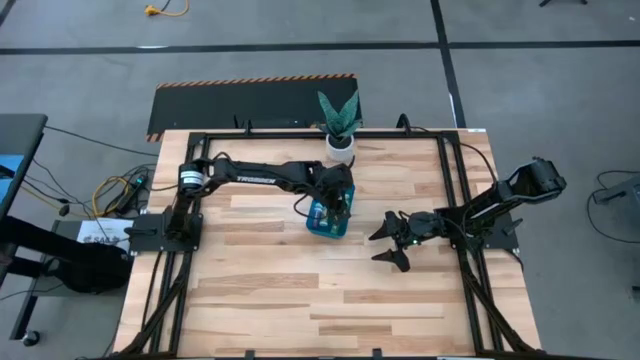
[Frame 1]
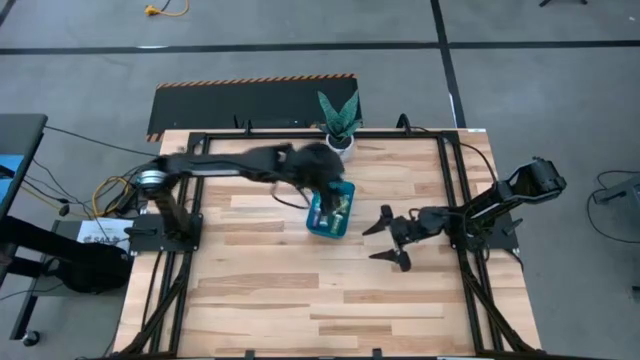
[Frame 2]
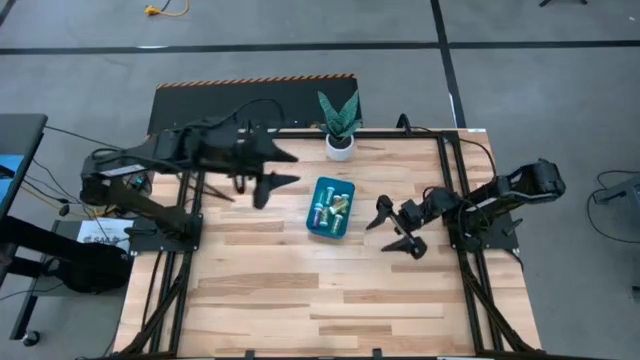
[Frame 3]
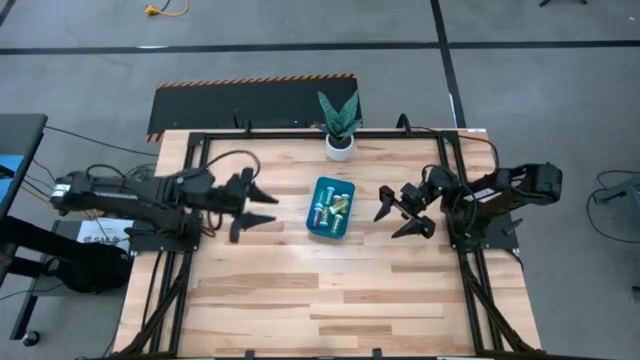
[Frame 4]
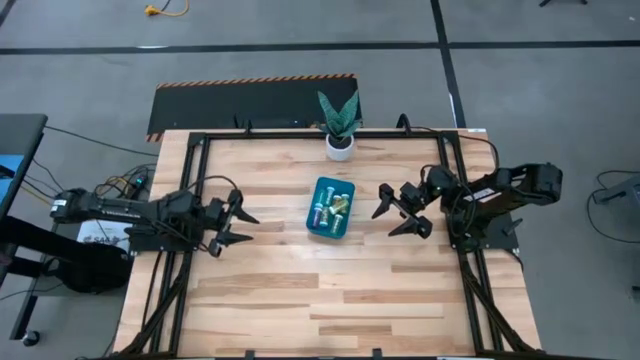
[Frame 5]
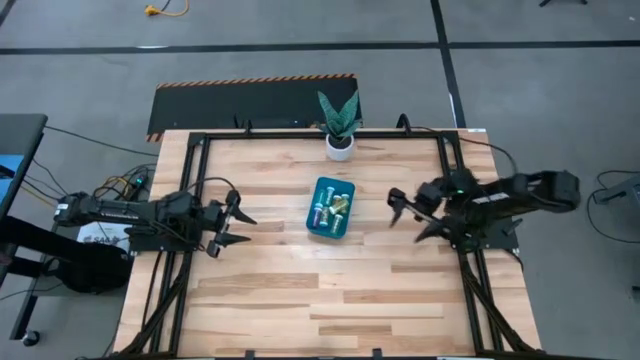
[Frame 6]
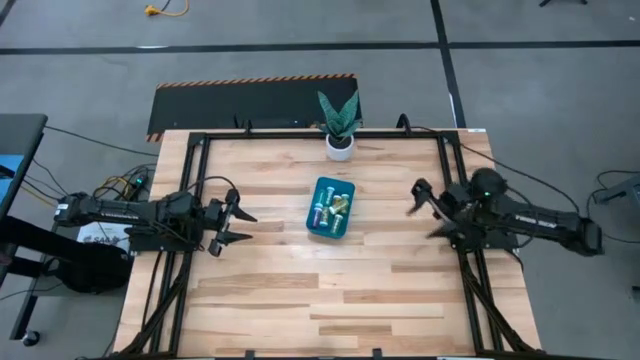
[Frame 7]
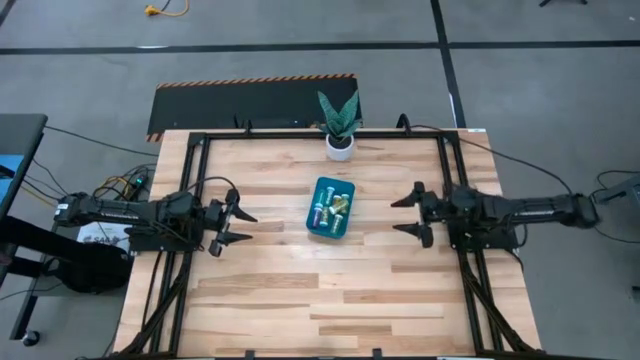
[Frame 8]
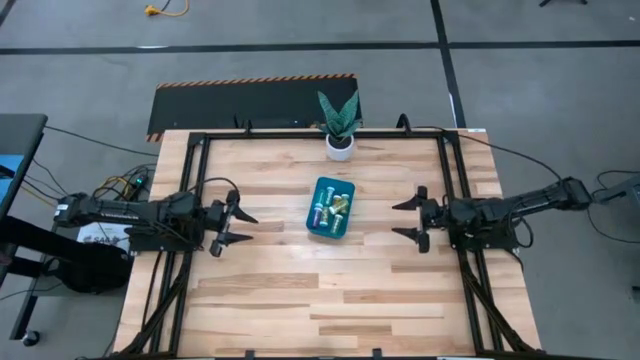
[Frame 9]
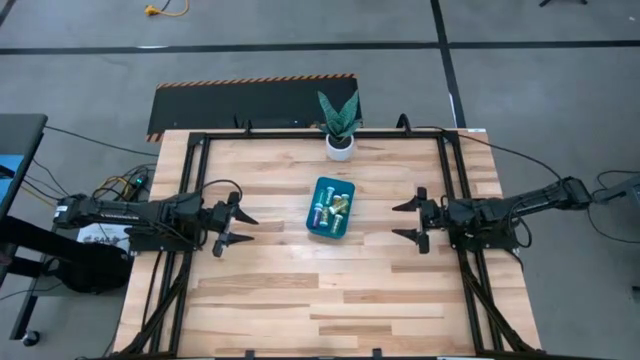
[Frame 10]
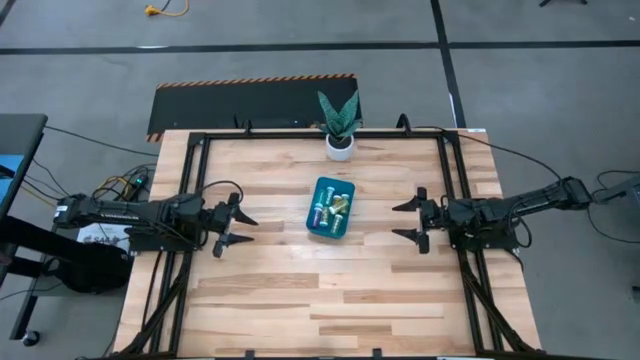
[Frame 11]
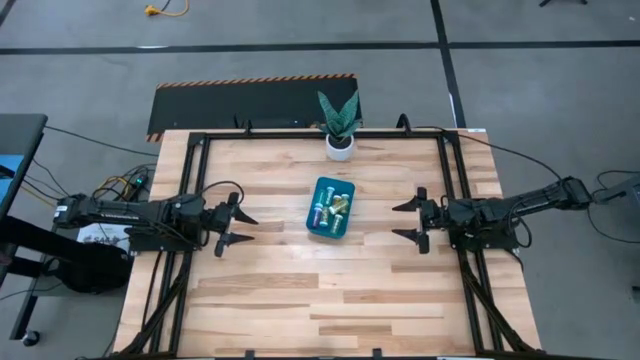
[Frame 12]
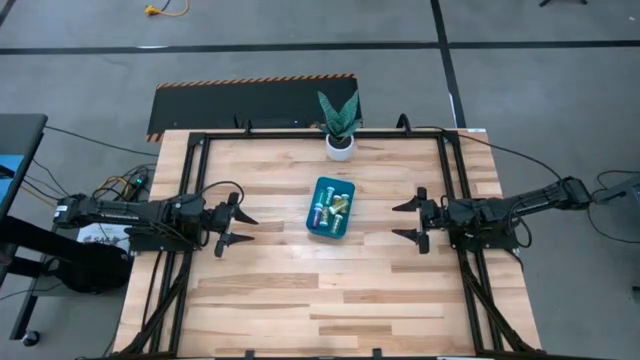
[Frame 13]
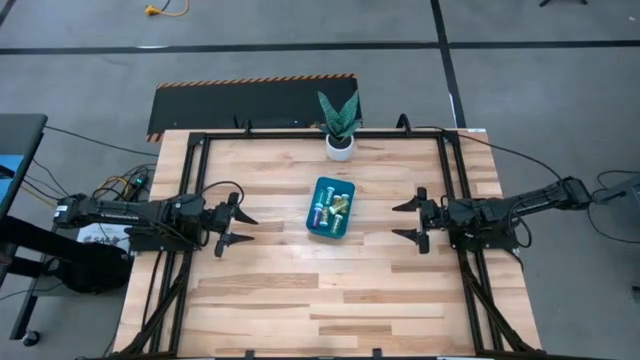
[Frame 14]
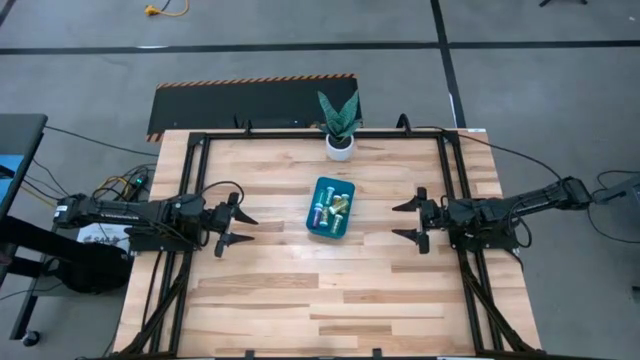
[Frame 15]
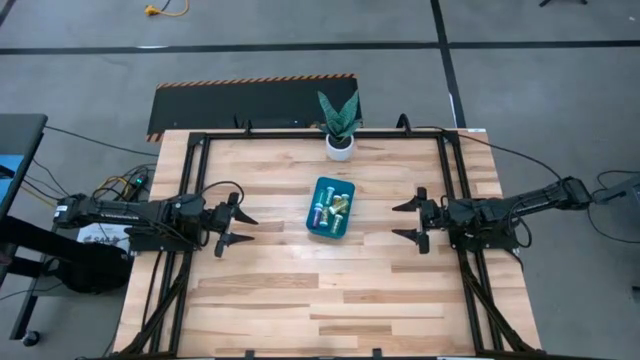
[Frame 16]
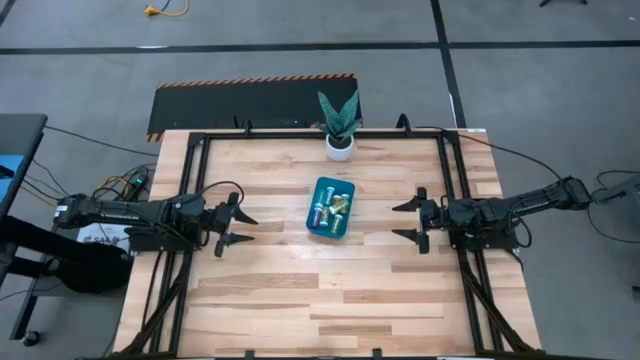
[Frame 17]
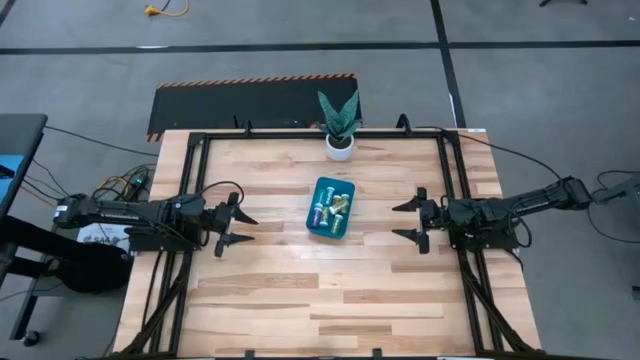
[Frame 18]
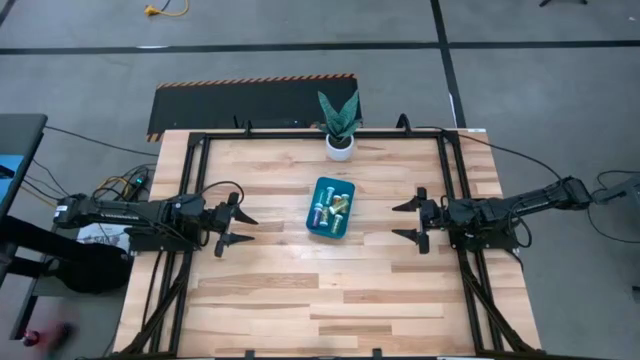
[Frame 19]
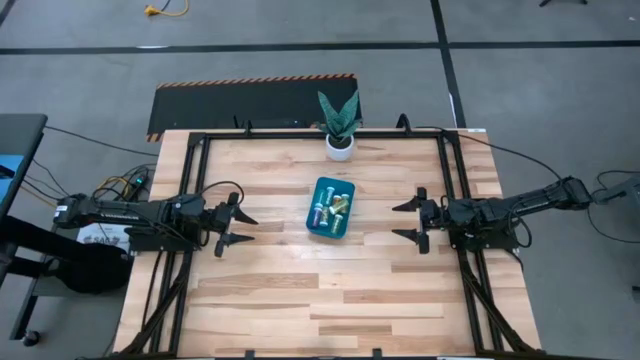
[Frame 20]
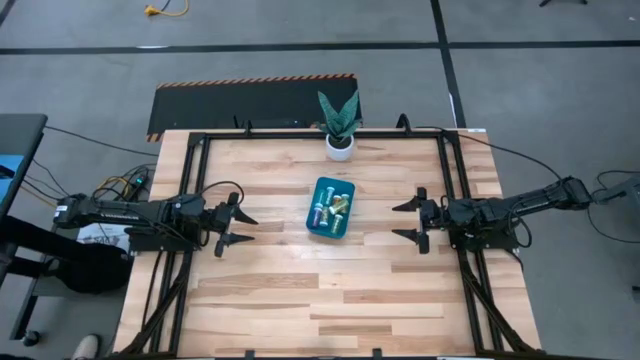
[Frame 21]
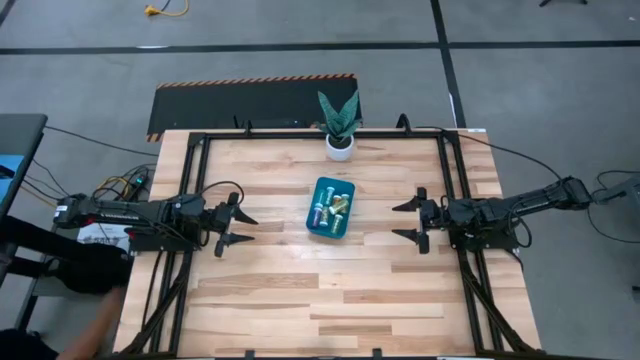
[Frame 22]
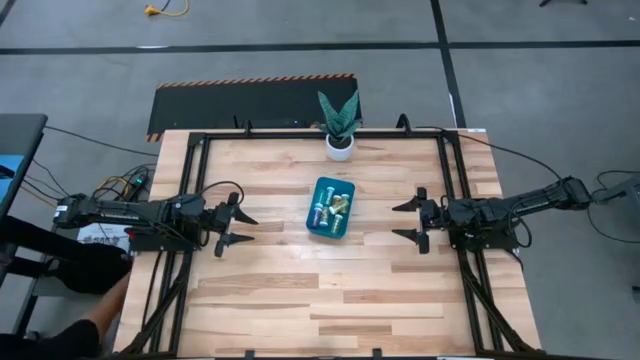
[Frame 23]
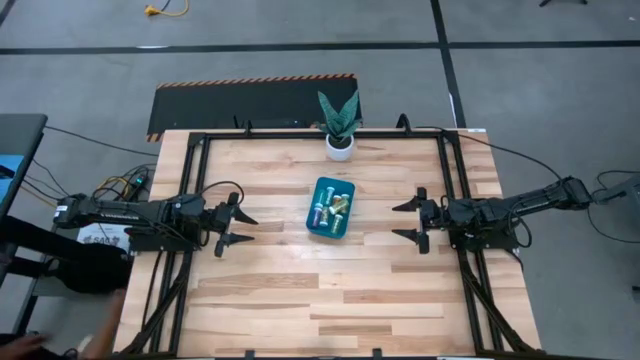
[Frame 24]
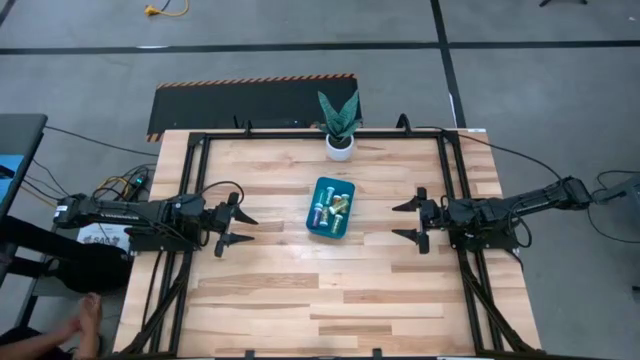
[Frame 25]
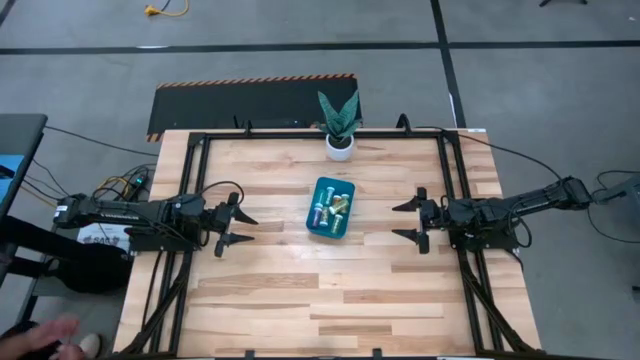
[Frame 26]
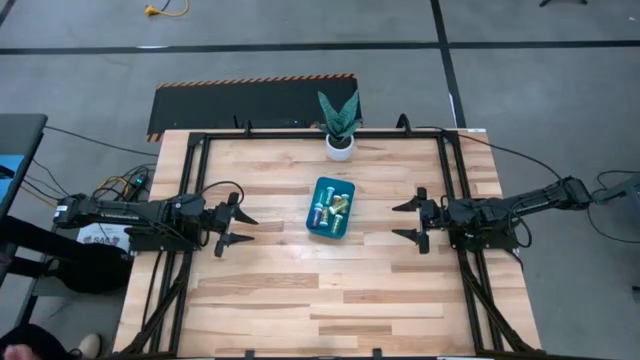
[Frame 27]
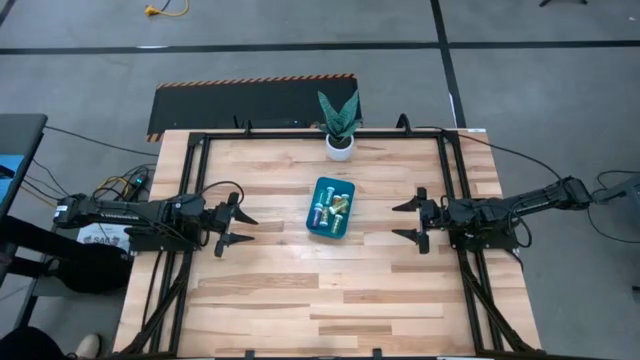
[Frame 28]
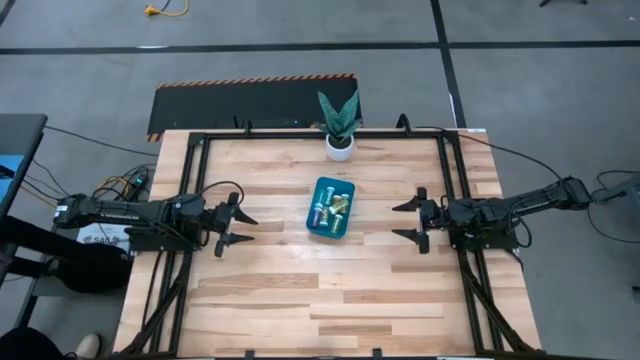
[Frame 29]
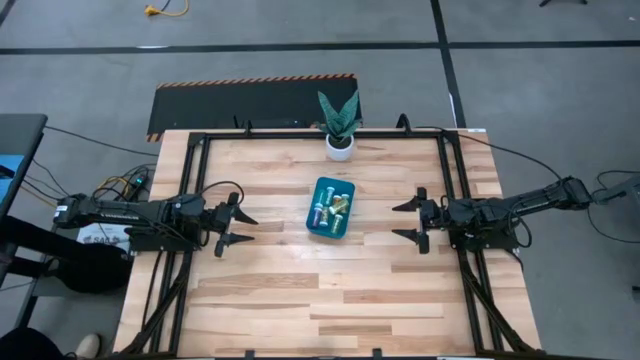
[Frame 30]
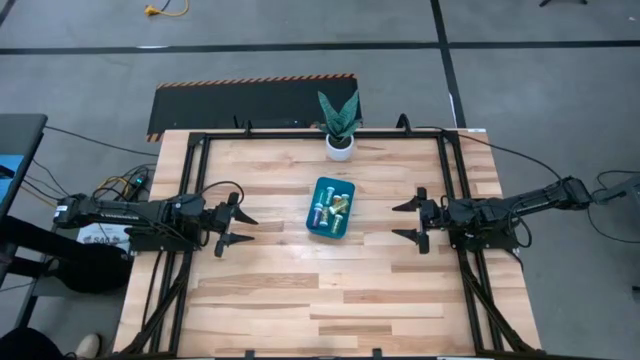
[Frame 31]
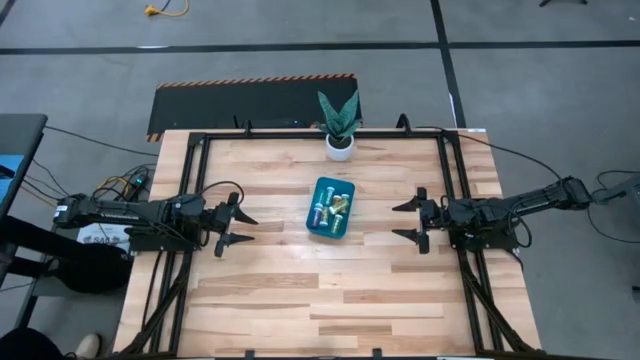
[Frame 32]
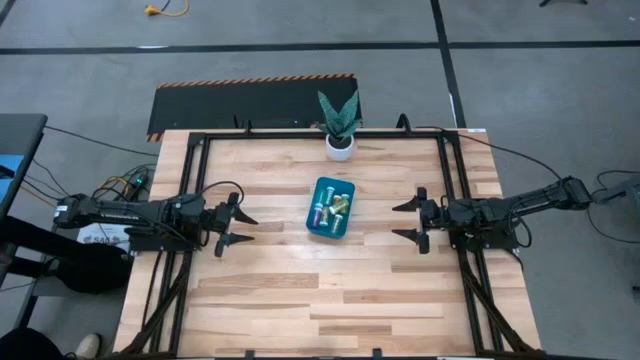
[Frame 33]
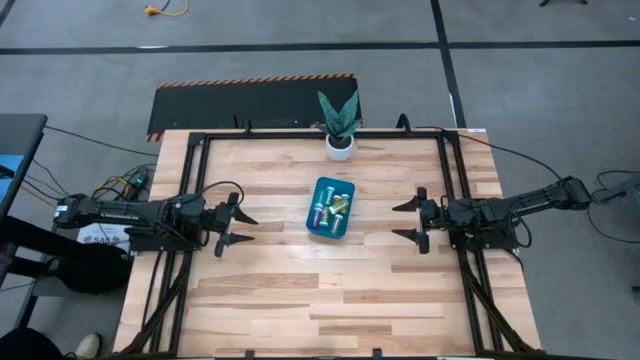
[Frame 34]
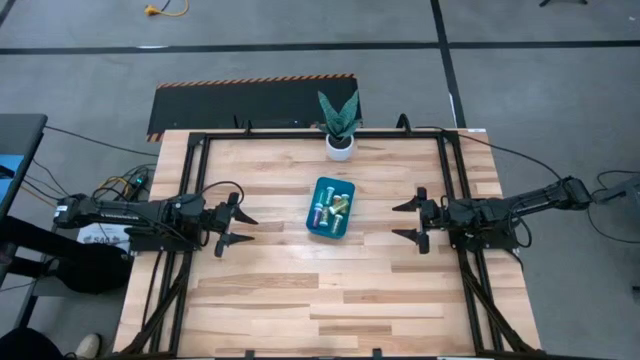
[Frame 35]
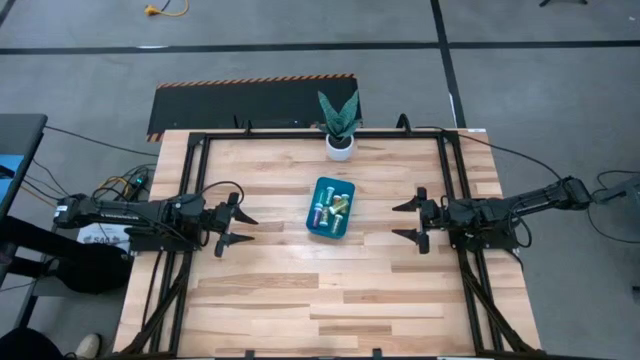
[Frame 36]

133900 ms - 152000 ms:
Task: Pick and place pill bottles into a basket
Return to Home Position

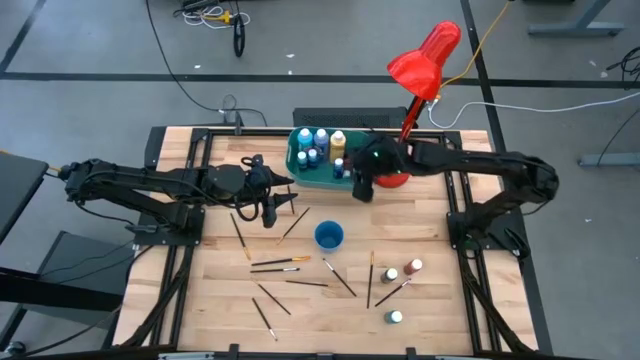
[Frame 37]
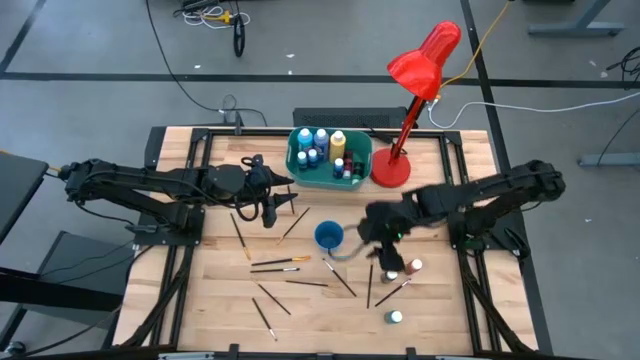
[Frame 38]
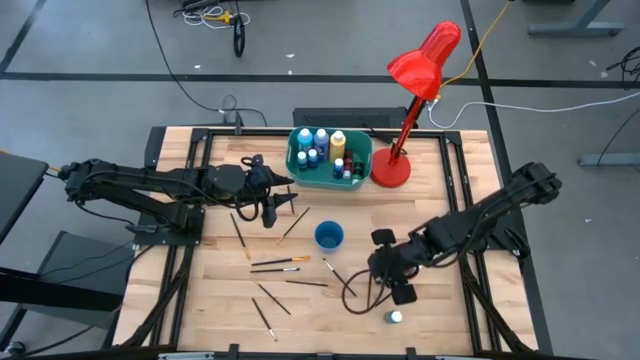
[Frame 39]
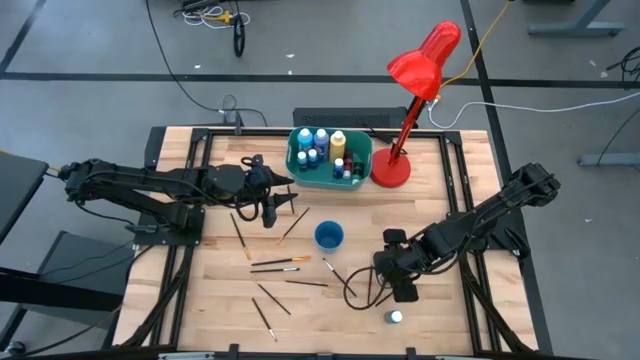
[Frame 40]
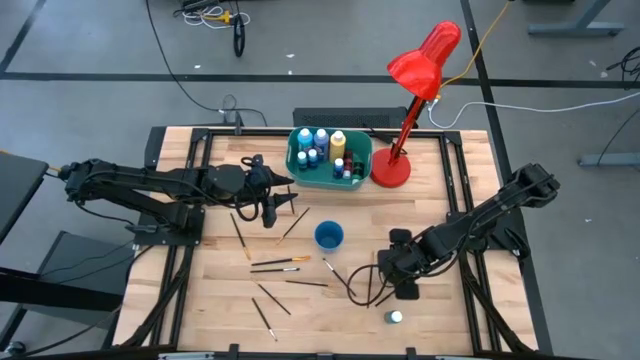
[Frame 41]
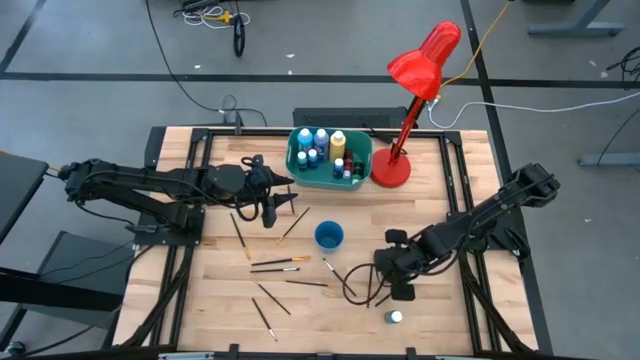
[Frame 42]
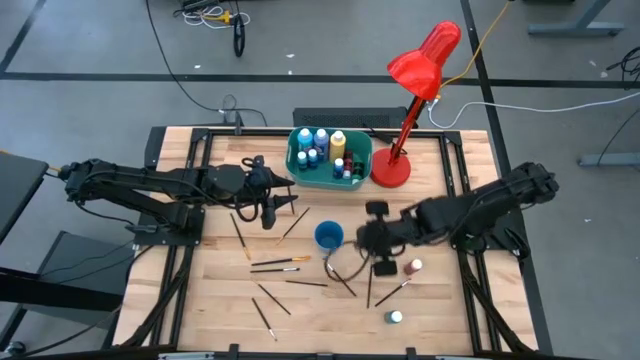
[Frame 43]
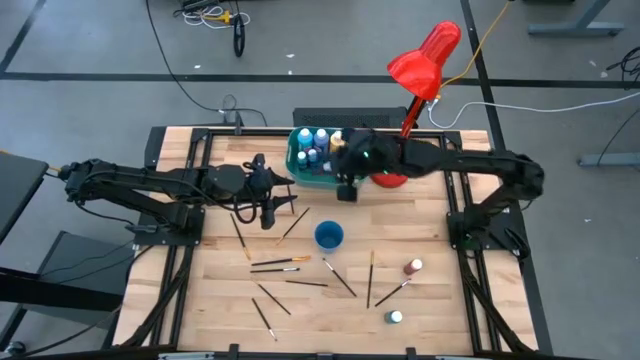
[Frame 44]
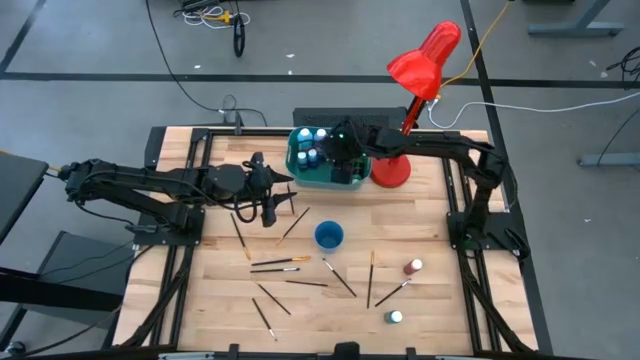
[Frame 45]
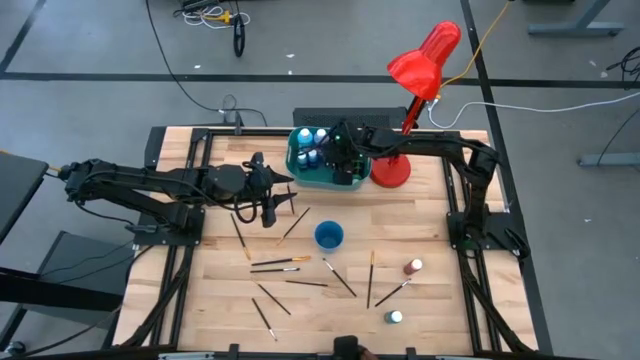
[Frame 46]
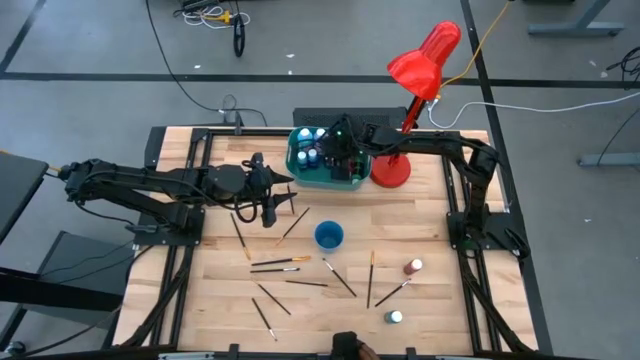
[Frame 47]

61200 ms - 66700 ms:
Task: Pick & Place Paint Supplies
Put the black paint bottle into the green bin
